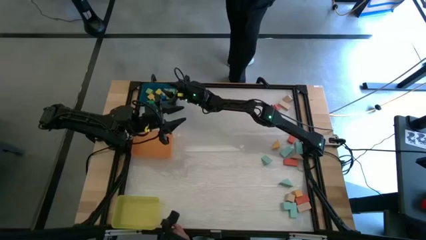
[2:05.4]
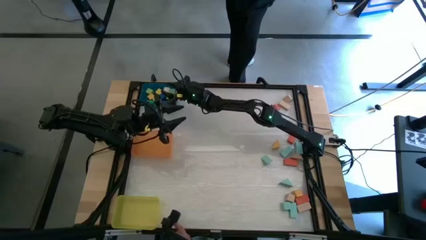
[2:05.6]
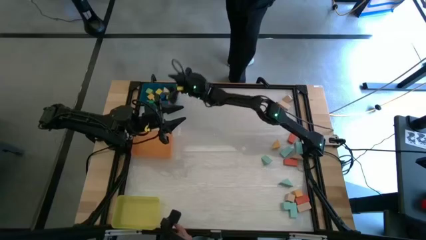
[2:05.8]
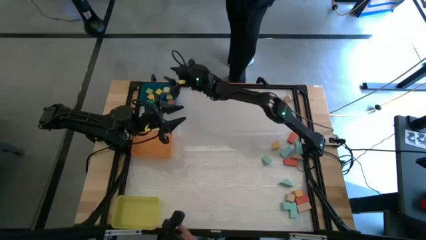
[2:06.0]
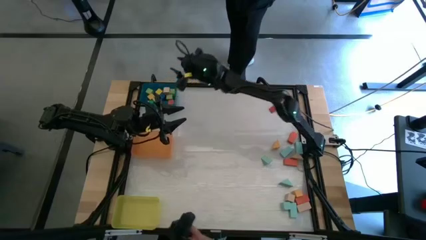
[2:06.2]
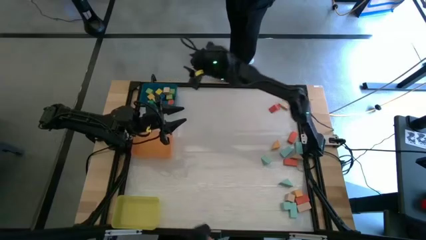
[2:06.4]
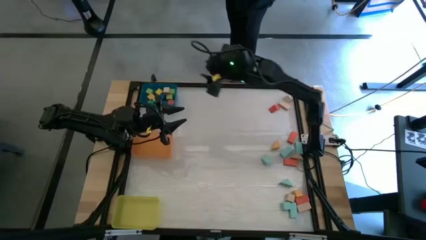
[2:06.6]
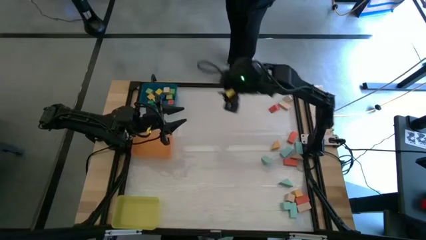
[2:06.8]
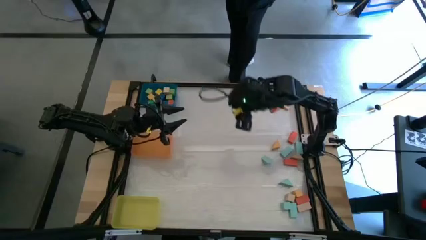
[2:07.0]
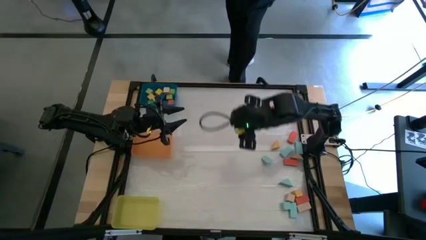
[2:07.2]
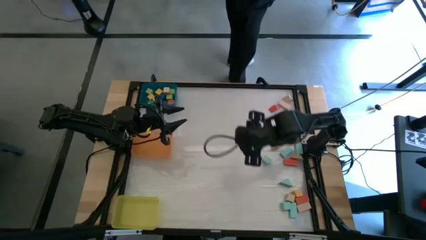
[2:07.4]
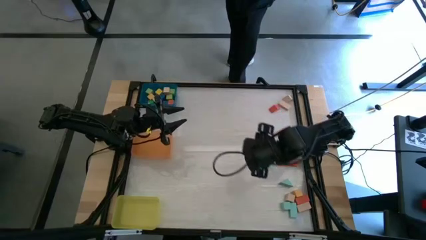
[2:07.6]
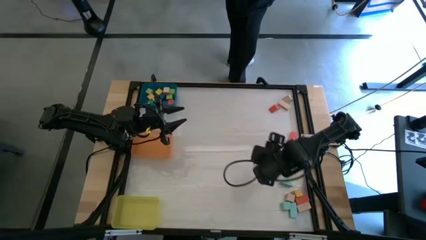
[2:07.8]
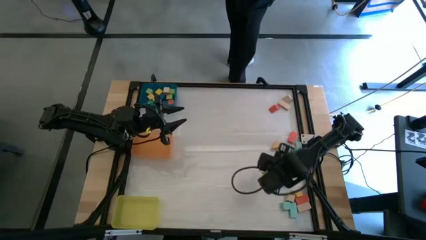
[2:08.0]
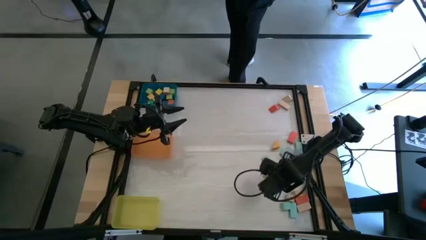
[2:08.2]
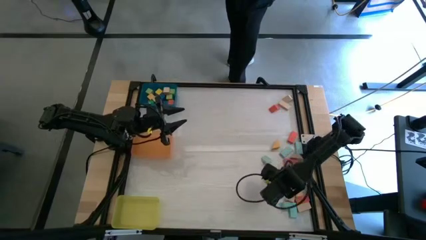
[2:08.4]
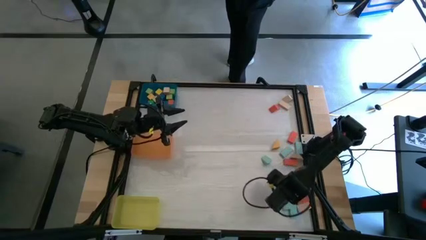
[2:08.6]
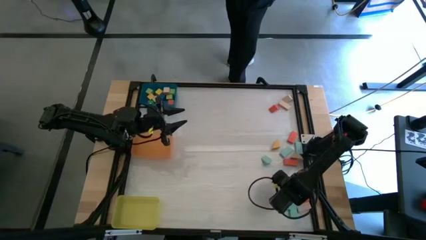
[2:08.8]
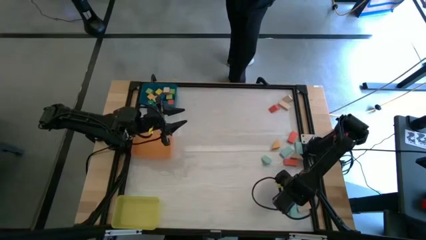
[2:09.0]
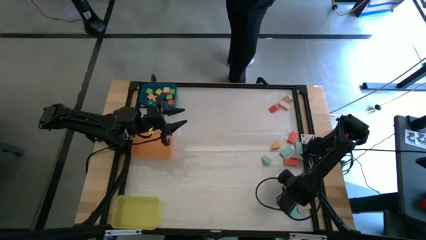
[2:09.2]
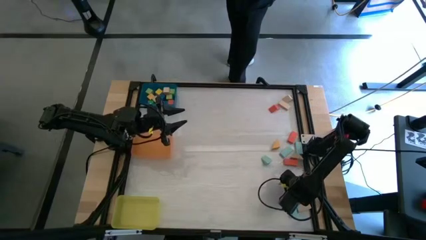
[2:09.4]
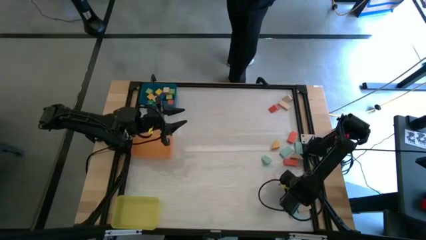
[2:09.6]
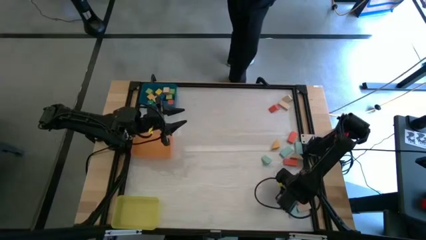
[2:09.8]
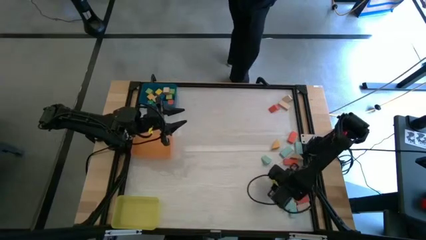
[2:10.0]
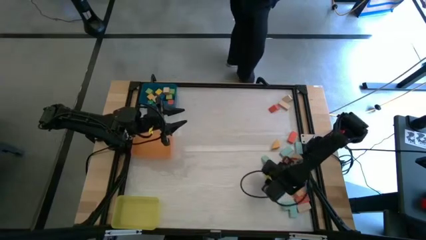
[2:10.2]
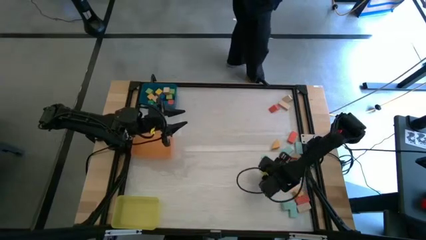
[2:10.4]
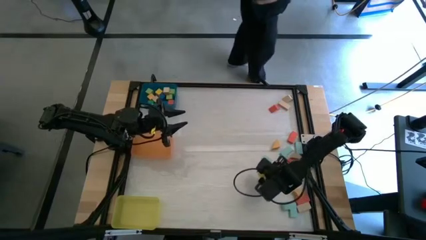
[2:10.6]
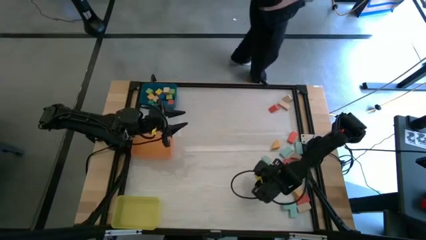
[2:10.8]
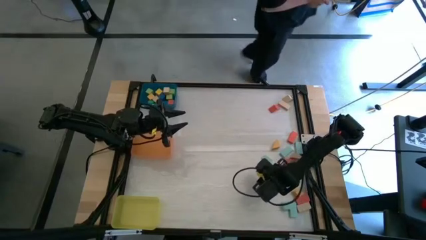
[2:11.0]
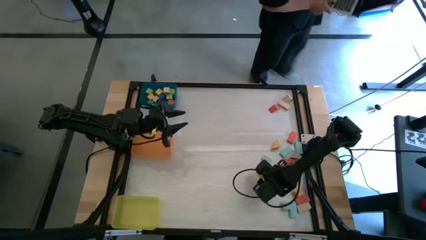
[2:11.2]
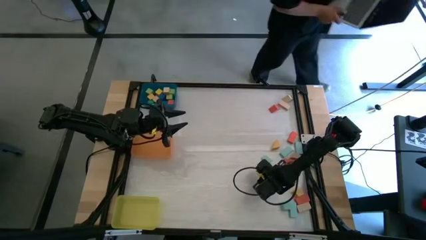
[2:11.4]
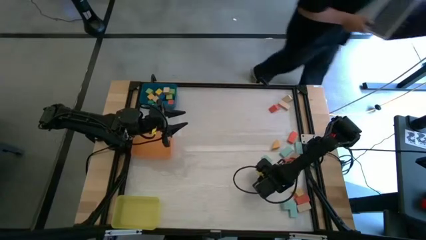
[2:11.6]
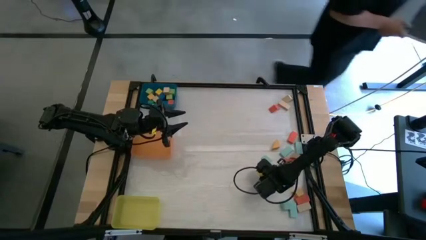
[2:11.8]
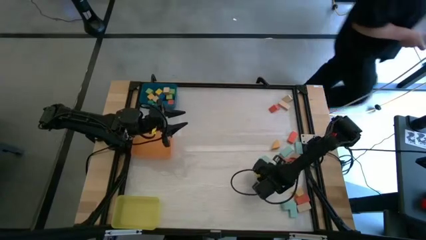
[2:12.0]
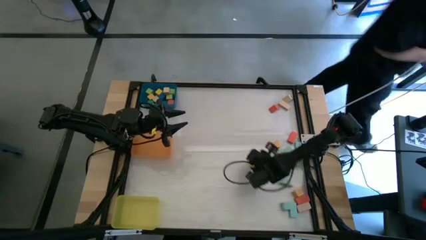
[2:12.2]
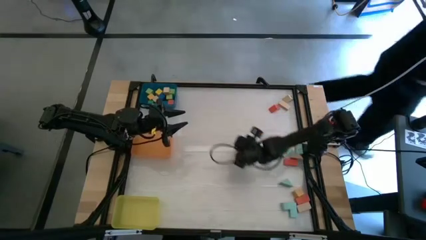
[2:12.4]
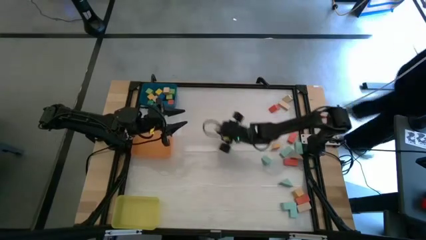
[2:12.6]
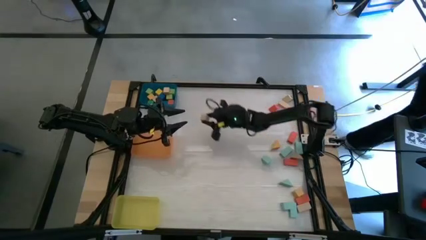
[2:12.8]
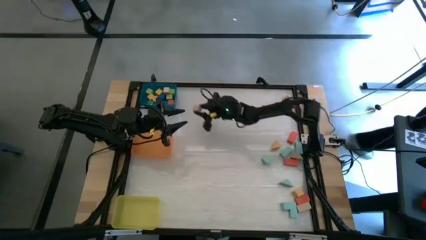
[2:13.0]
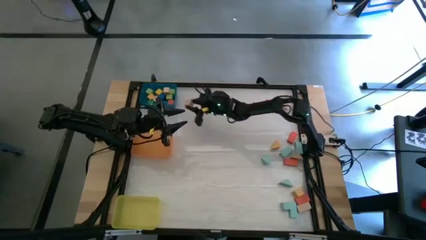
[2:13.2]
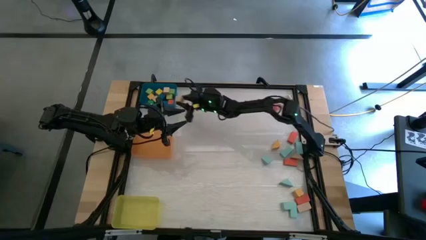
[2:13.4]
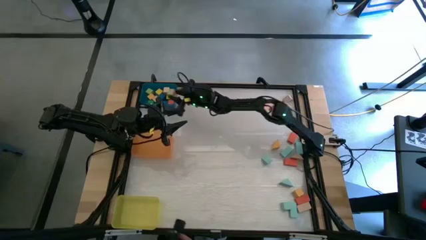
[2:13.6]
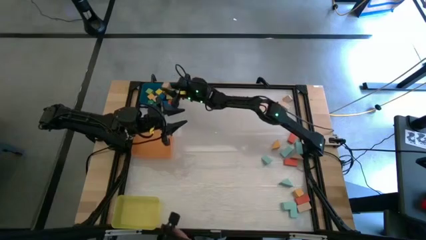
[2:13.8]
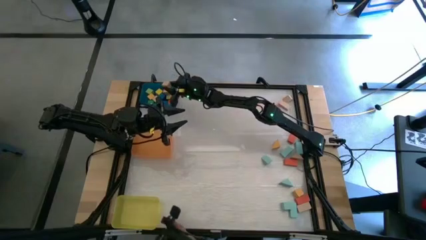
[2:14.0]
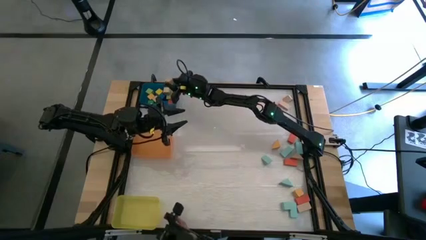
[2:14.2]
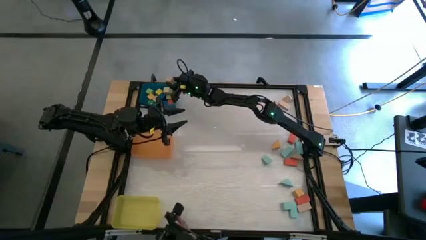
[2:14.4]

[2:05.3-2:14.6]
Task: Sort blocks by size
Put the light brown cube block into the blue bin

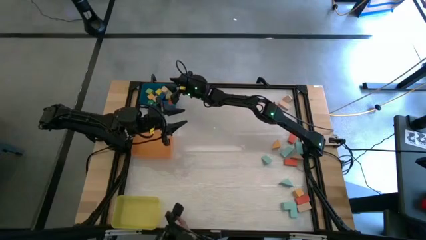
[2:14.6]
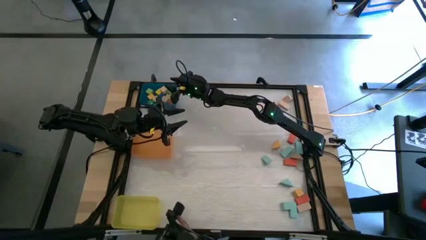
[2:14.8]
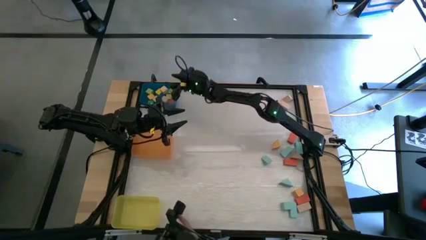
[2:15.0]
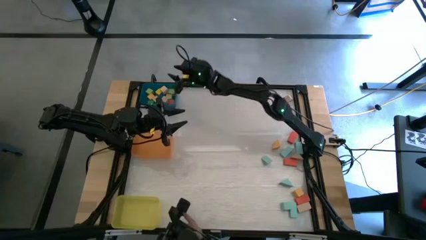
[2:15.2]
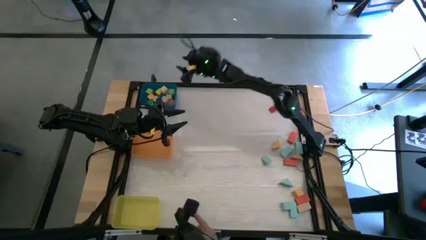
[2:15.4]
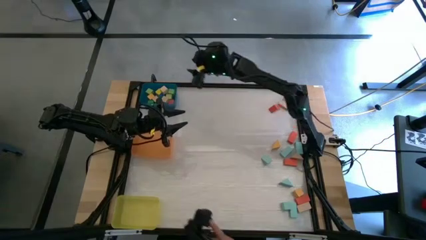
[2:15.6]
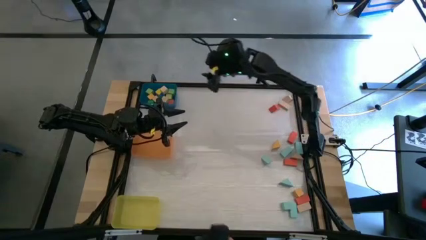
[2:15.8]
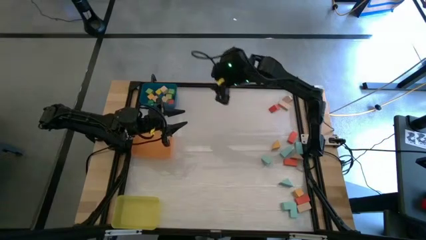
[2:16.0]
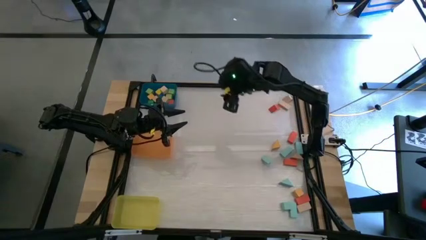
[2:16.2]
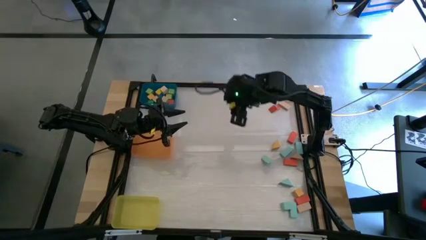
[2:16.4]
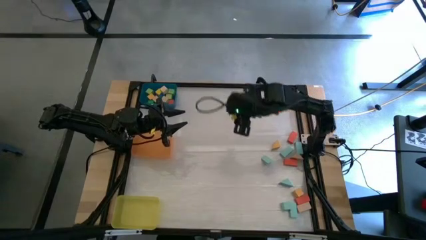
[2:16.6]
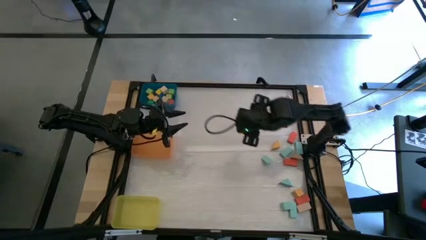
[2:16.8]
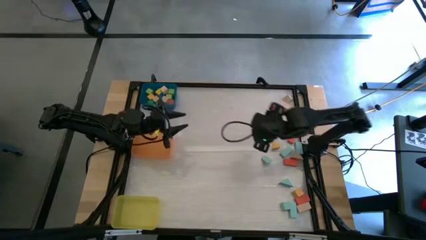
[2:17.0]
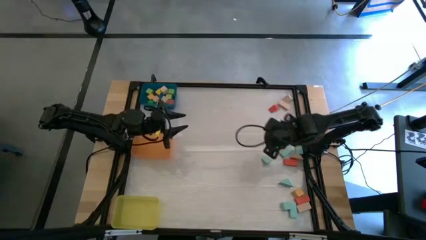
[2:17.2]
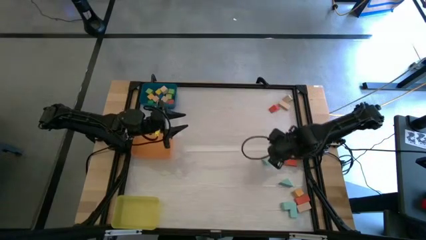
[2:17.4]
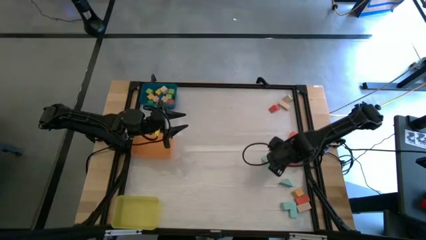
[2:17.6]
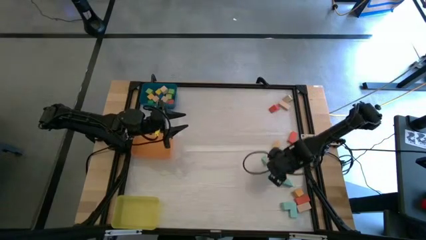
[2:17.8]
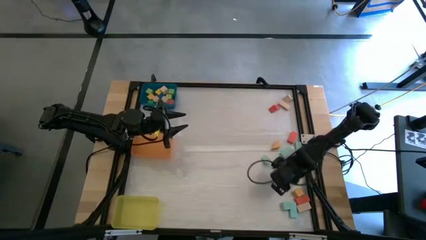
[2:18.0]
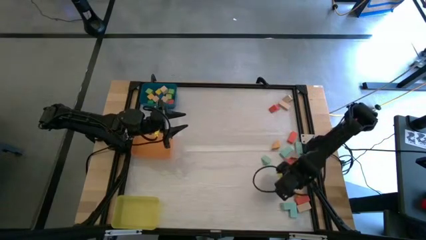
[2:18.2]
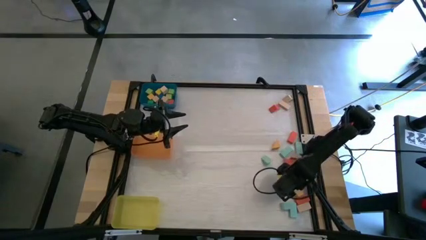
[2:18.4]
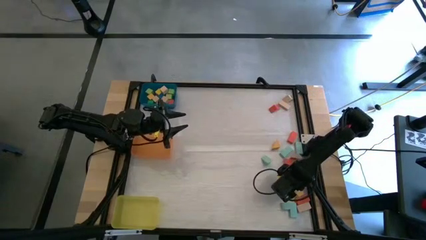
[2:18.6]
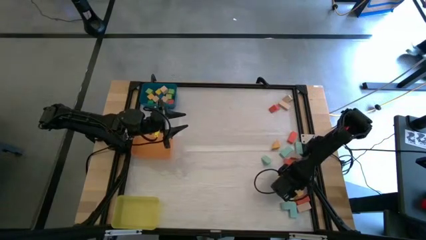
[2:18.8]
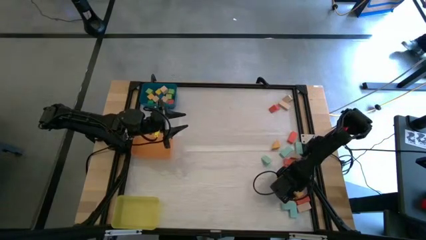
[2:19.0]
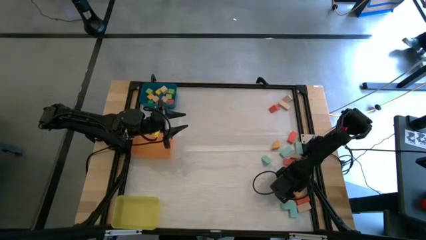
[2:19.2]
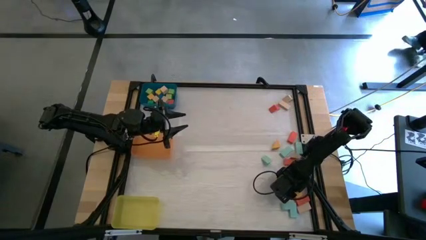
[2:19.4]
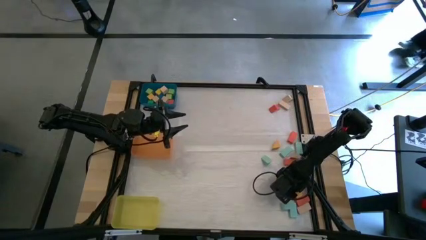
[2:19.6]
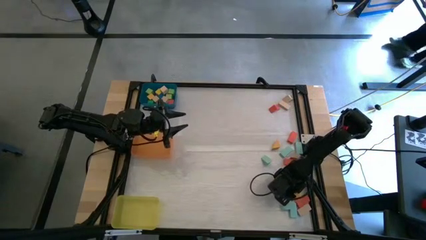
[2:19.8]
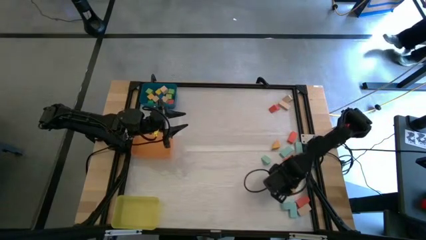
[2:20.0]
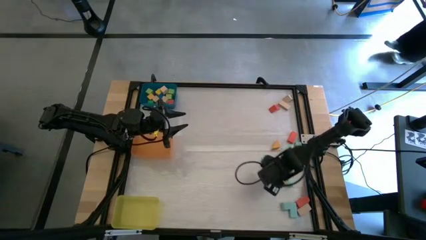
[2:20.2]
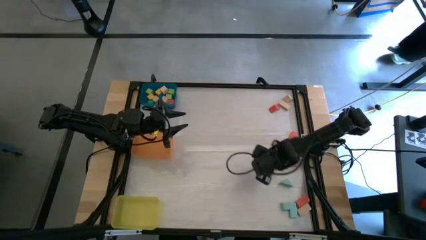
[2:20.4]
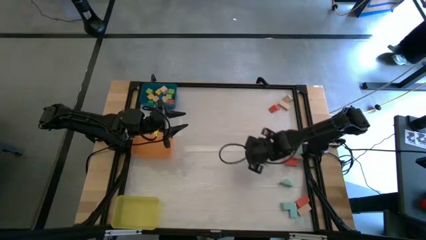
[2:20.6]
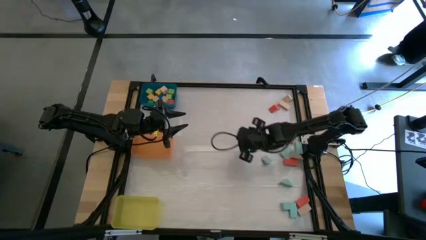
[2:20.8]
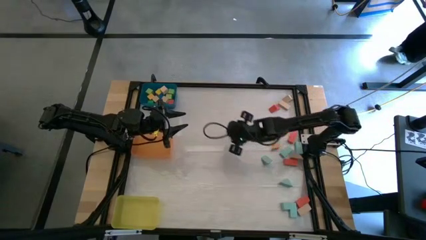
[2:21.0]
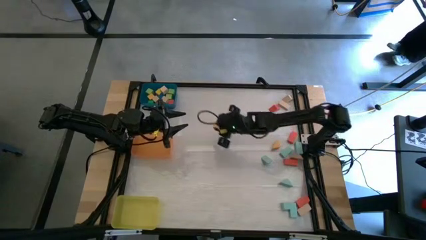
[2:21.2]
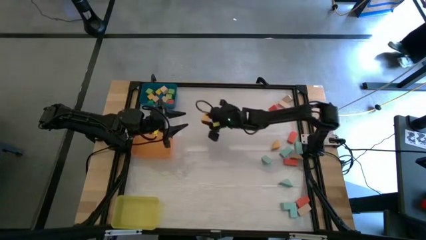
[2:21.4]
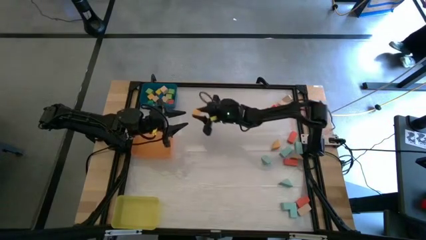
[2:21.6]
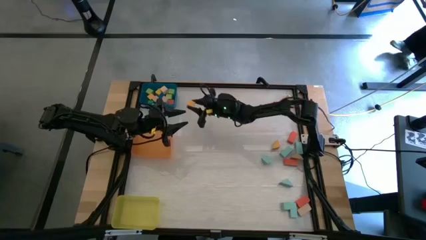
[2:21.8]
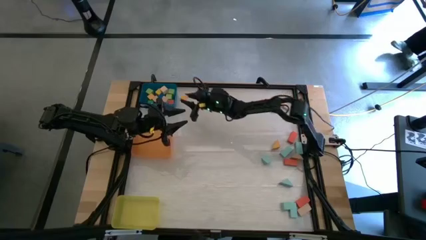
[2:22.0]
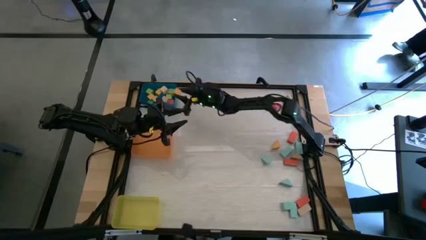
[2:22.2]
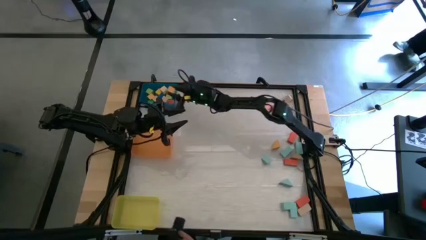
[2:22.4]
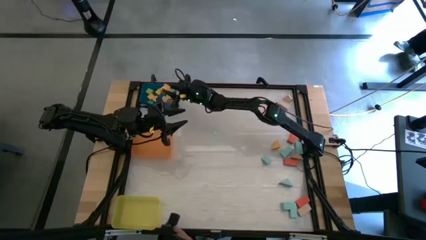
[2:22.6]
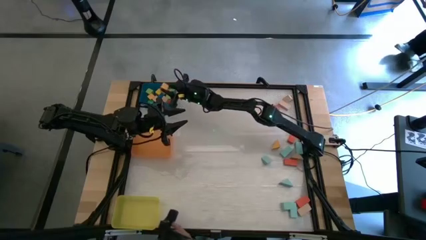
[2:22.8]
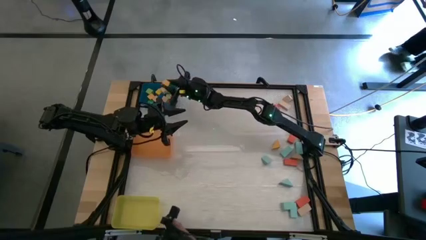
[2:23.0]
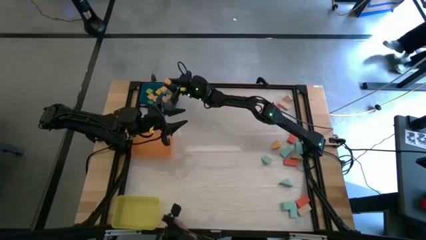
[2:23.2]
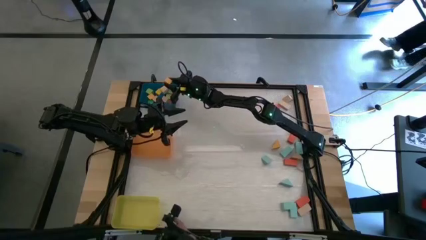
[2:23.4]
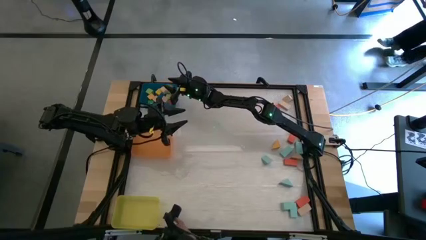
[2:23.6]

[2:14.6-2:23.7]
Put the yellow cube block into the blue bin
